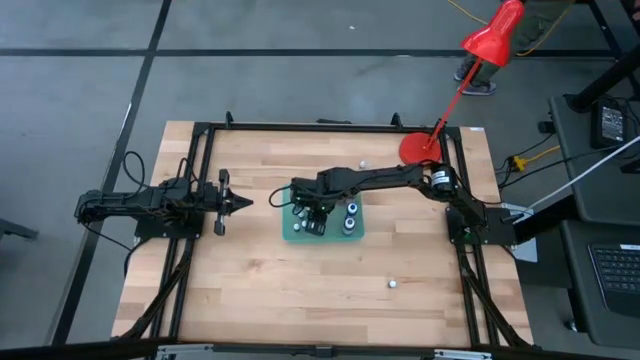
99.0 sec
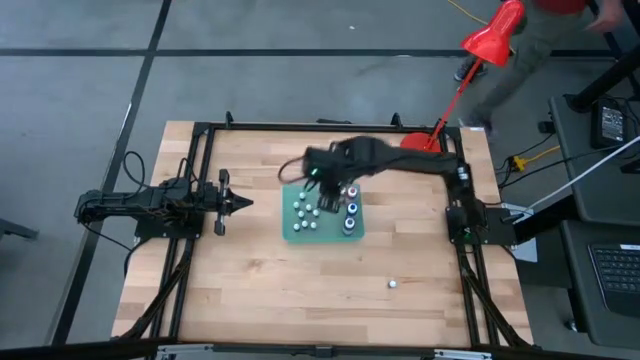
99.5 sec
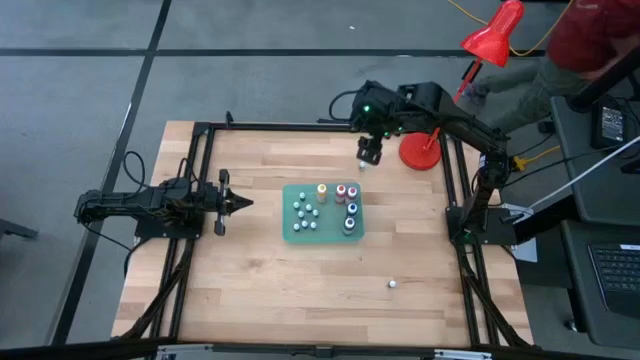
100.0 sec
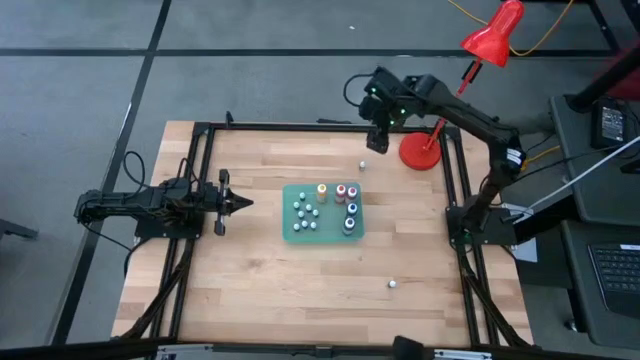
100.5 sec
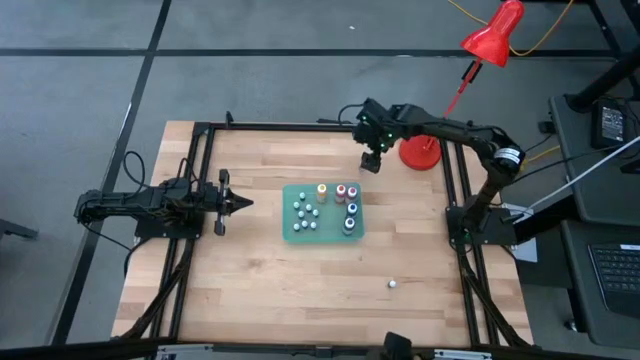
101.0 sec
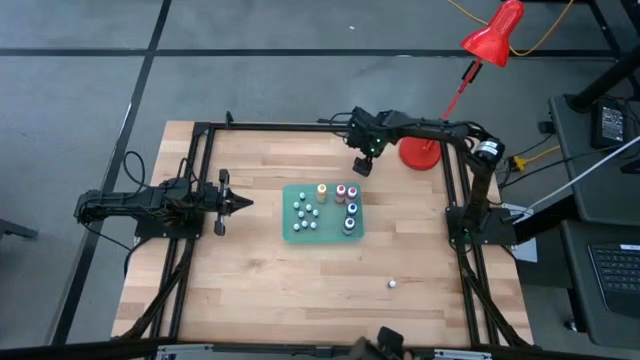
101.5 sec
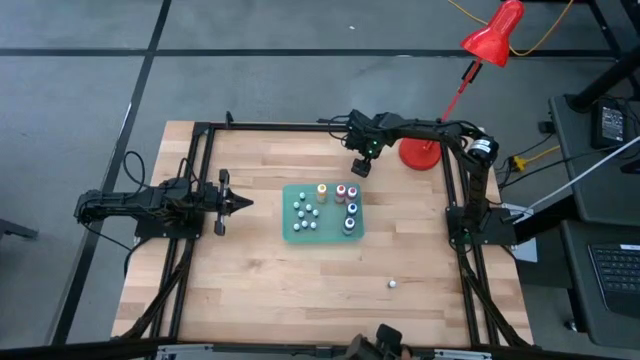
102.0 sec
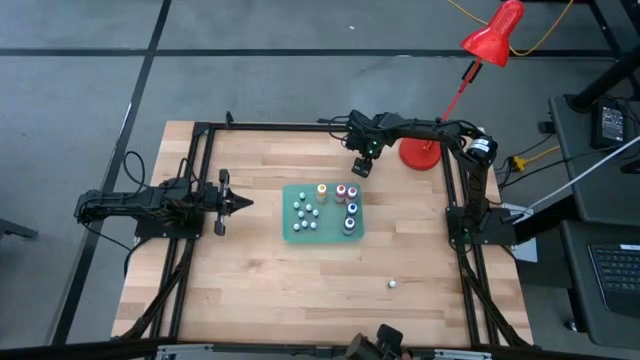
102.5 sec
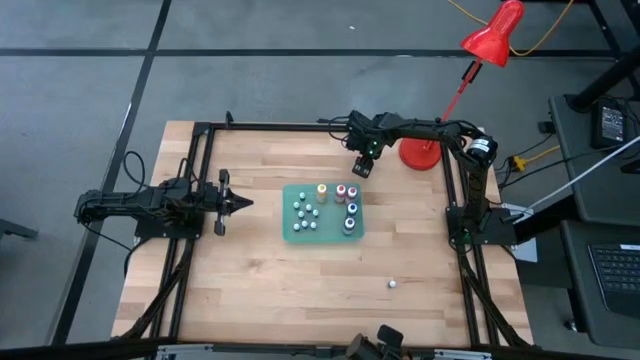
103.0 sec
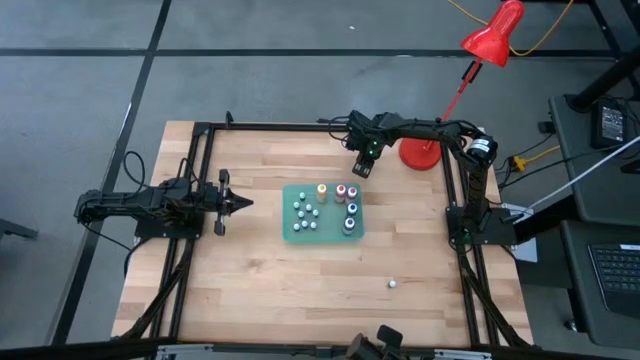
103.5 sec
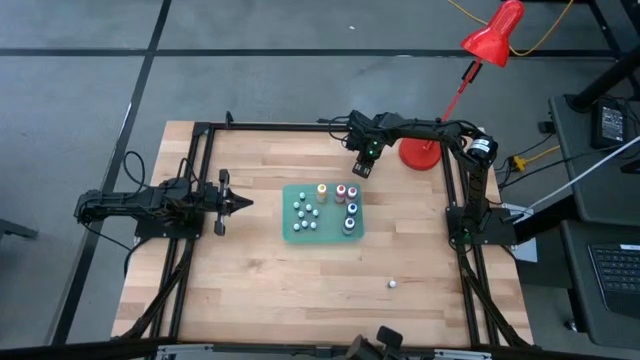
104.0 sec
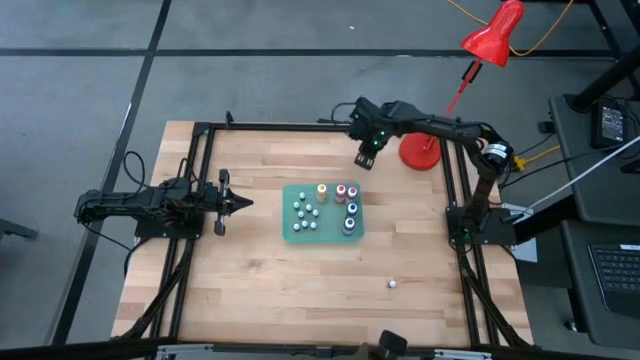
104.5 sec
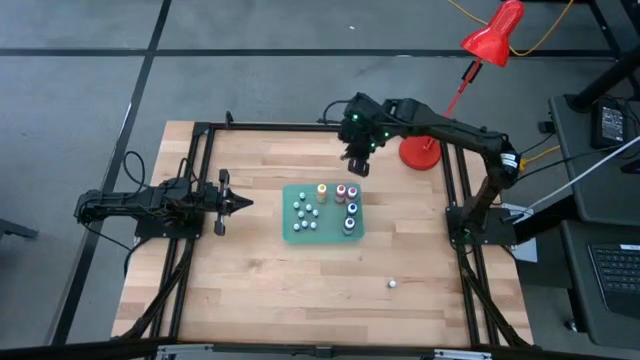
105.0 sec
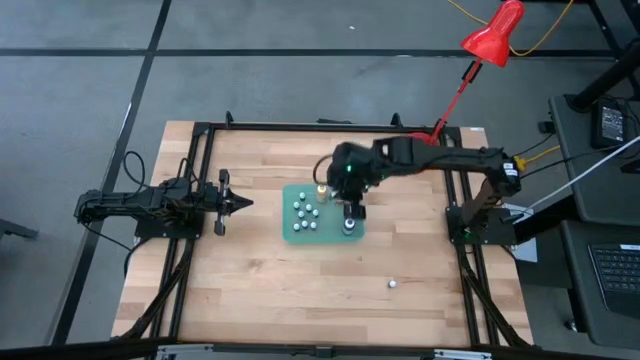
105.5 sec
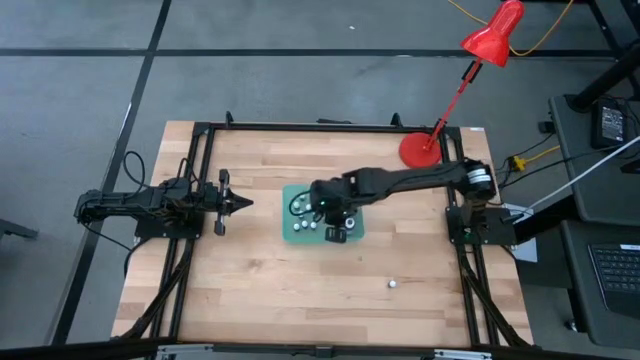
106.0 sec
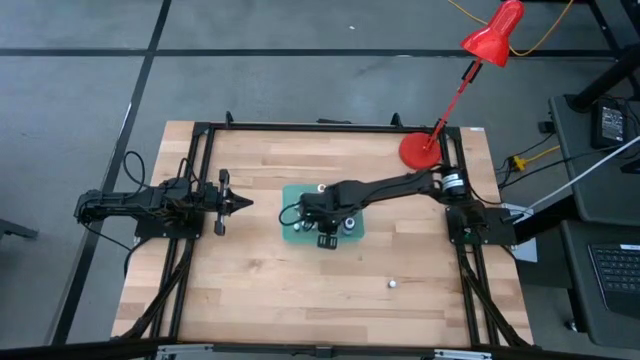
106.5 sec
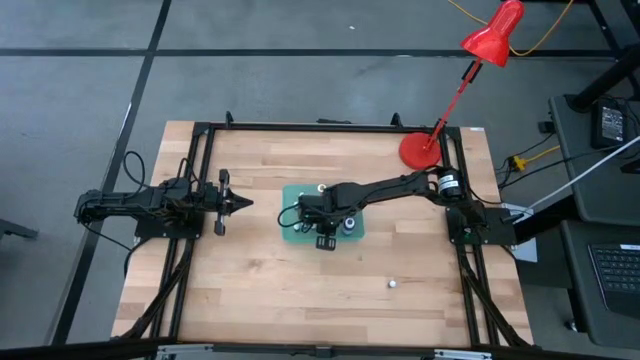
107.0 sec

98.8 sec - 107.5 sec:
Task: Pick & Place food coloring
Put the small green food coloring bottle into the green bin

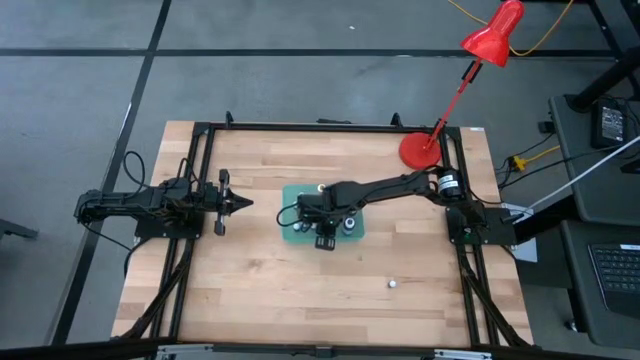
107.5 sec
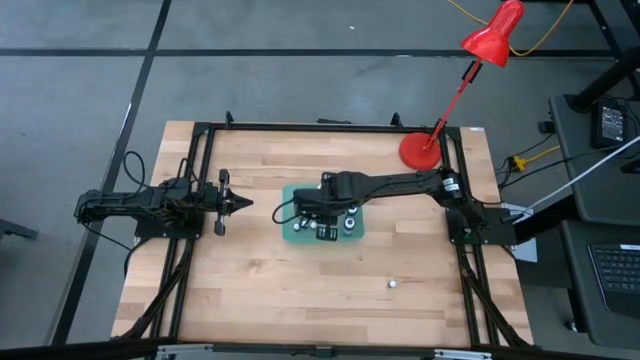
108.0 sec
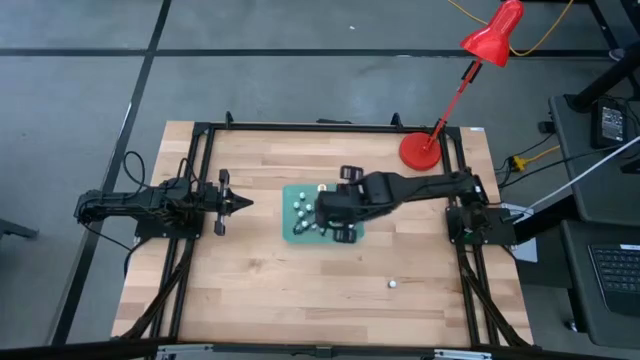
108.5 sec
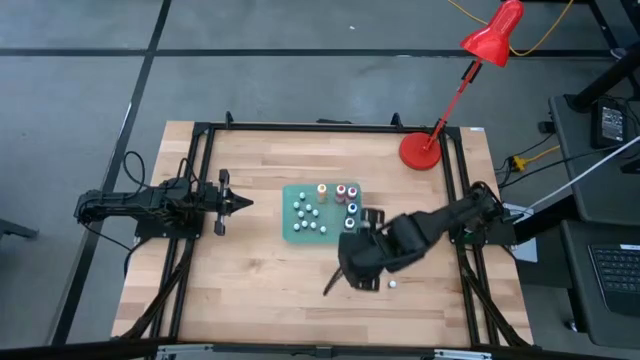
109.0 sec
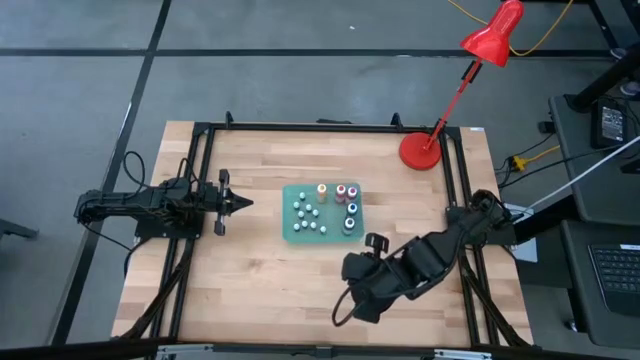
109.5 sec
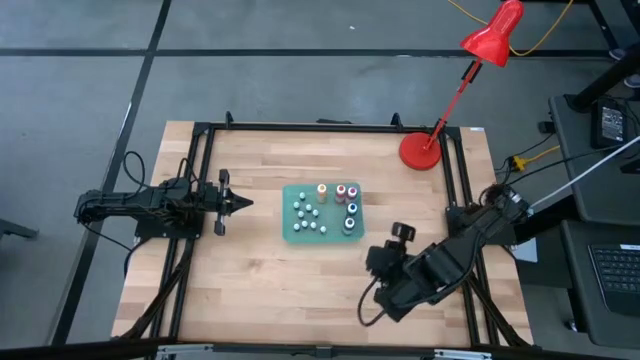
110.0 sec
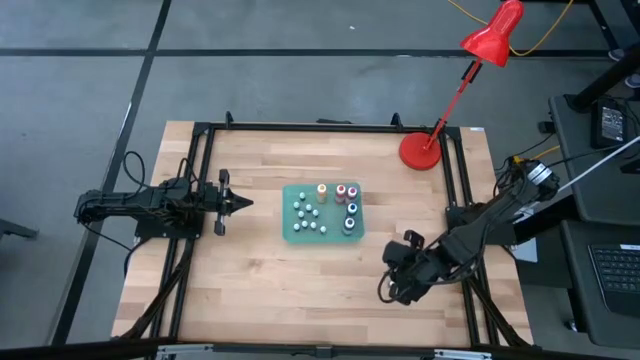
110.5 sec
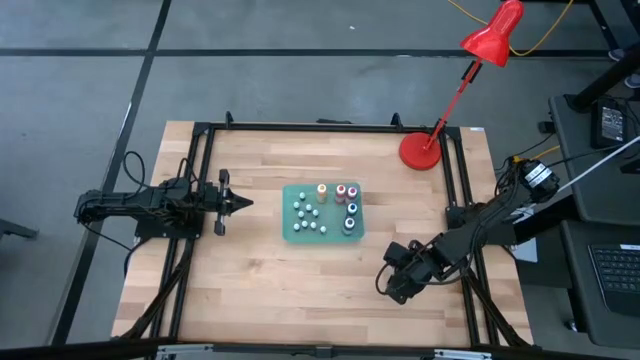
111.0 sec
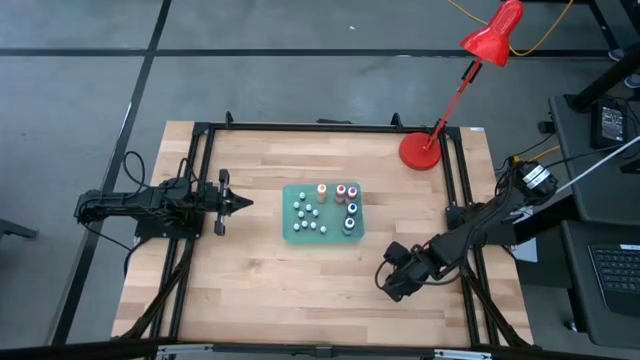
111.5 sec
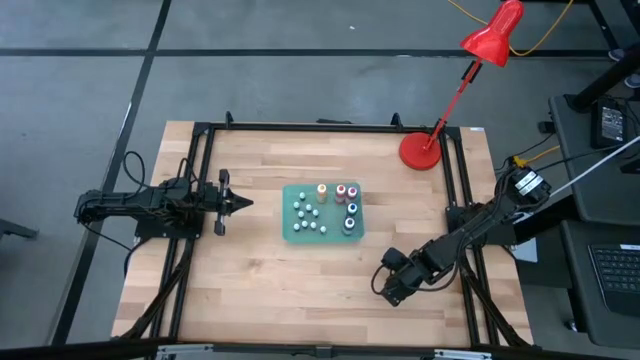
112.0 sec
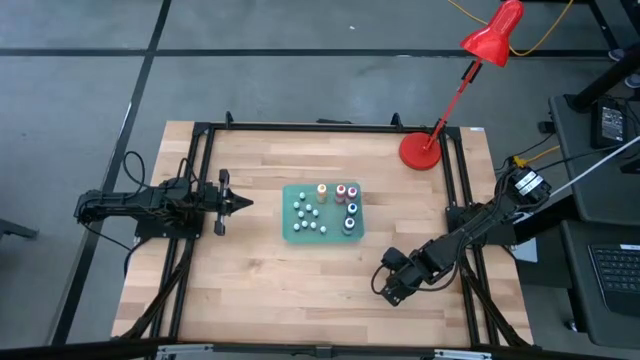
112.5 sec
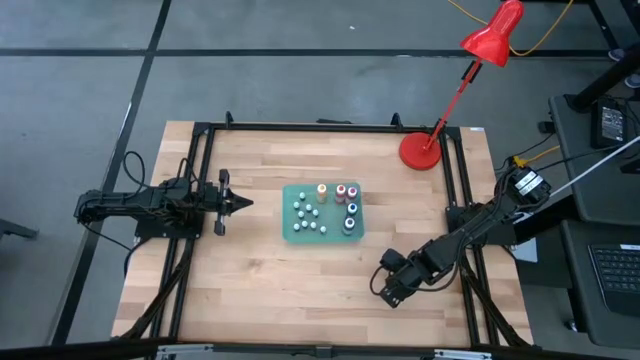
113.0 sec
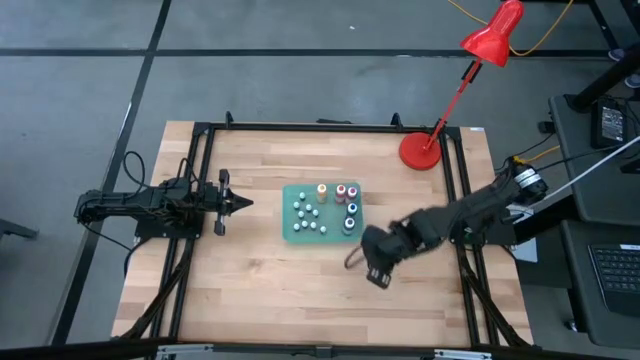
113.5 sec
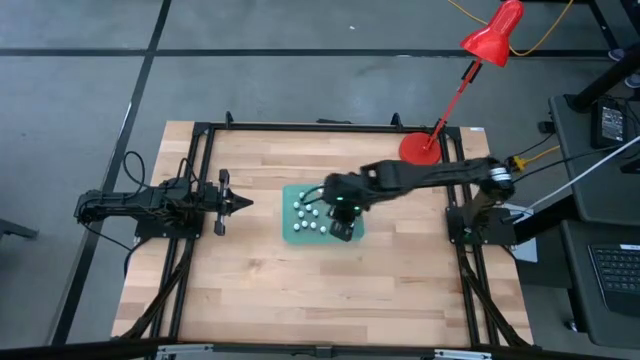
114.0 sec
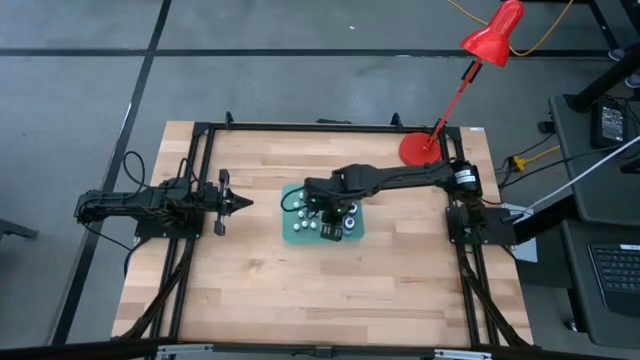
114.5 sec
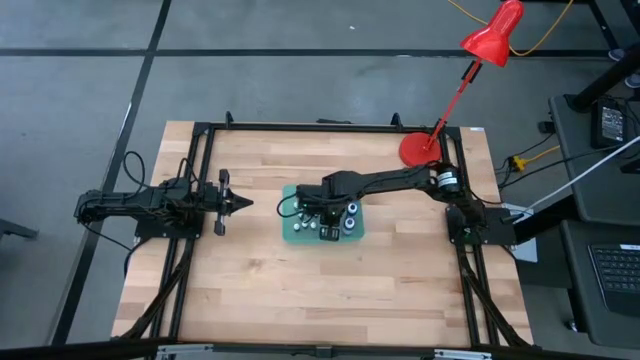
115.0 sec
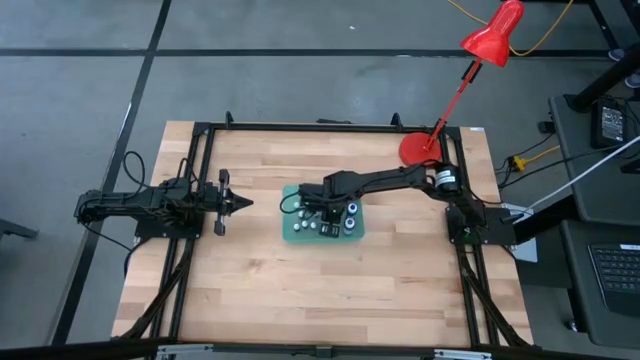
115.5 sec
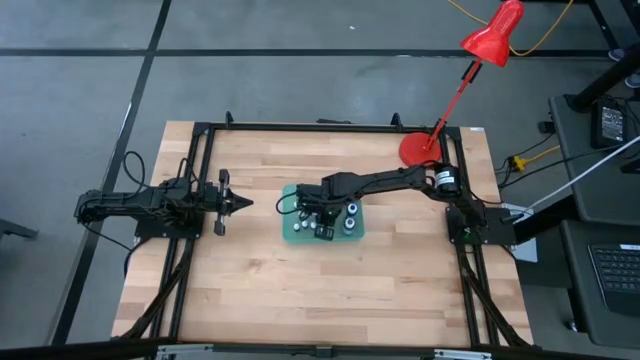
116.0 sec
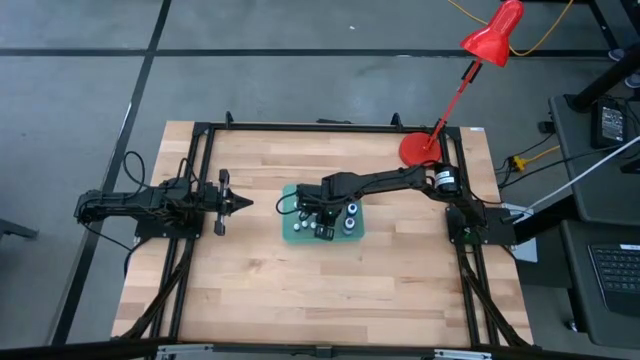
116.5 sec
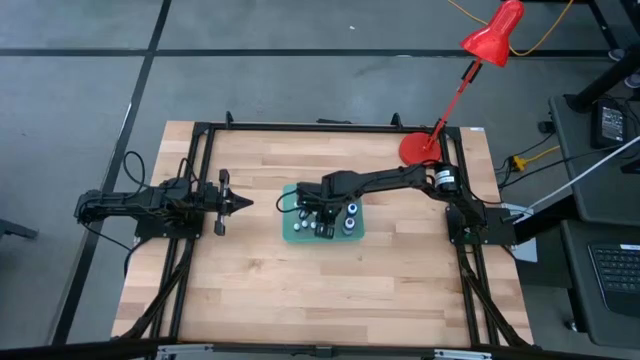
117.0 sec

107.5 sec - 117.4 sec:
Put the small purple food coloring bottle into the green bin

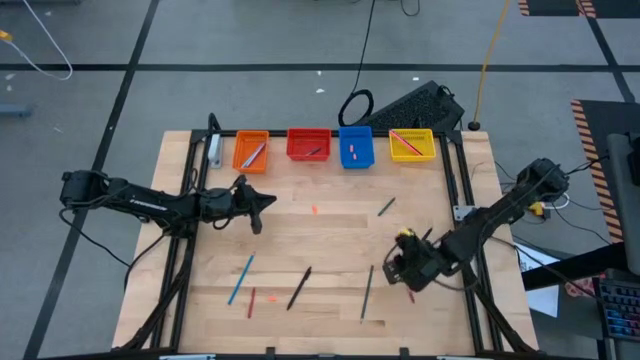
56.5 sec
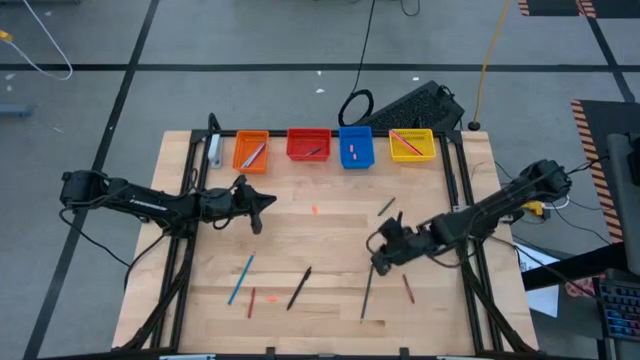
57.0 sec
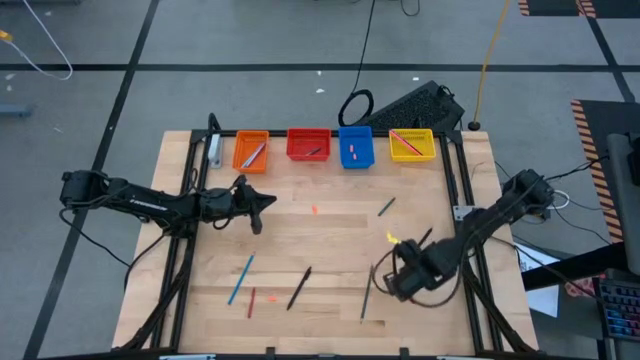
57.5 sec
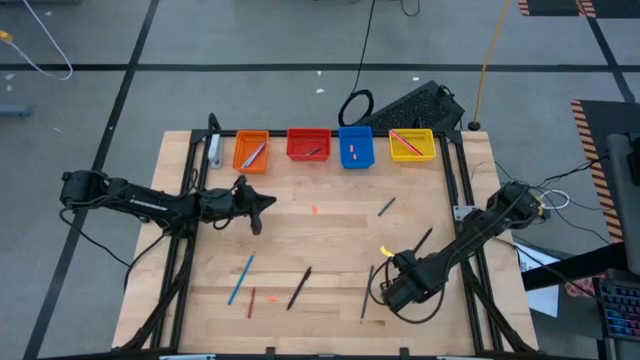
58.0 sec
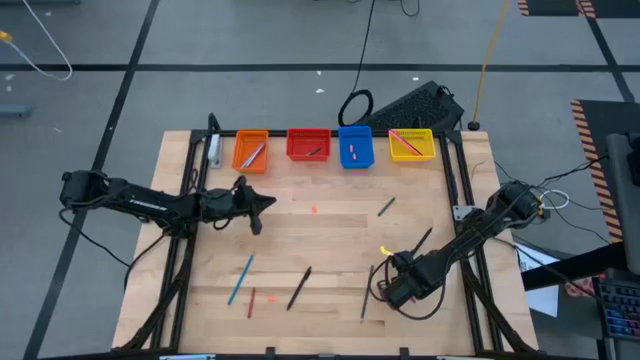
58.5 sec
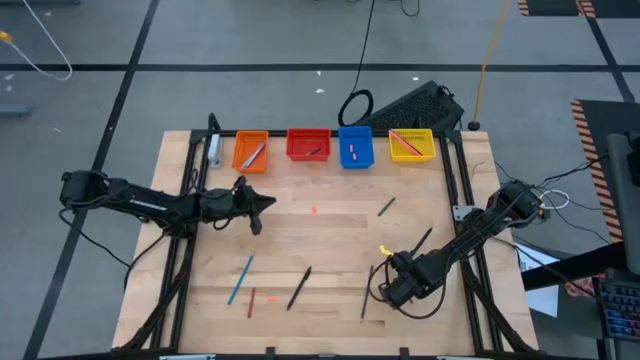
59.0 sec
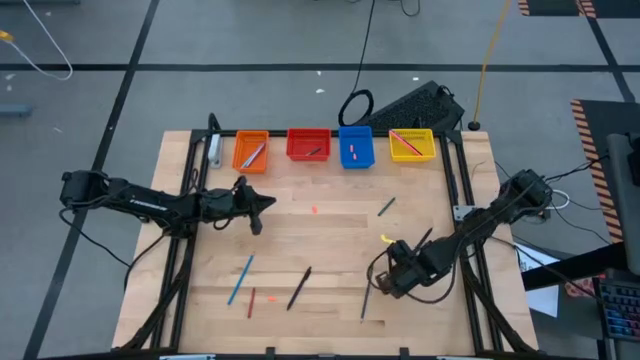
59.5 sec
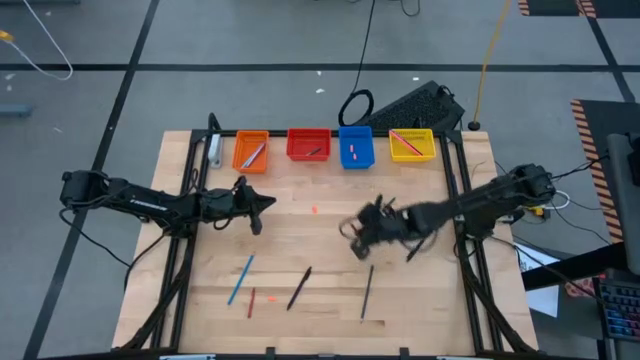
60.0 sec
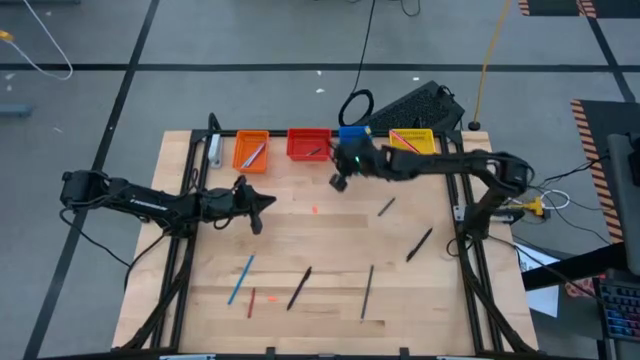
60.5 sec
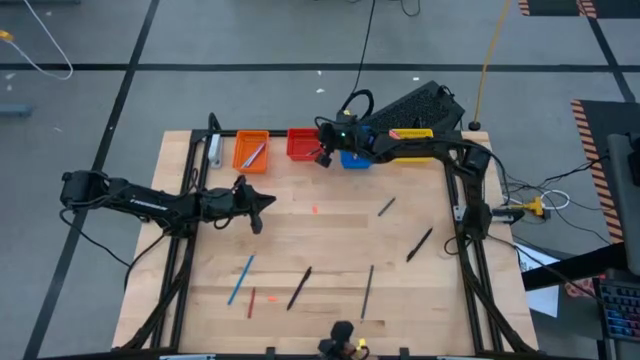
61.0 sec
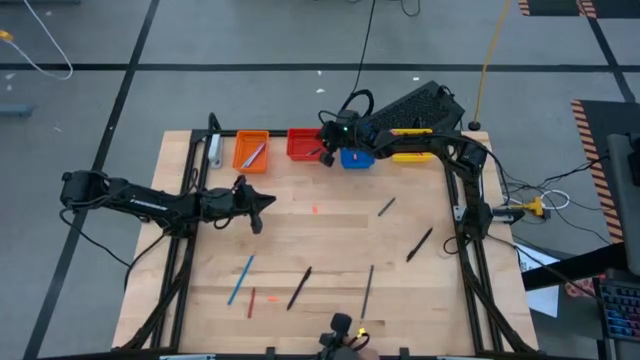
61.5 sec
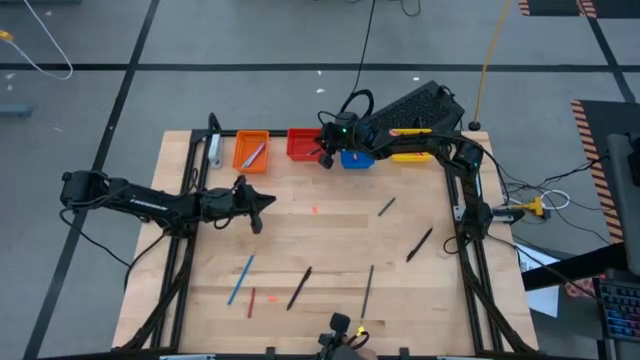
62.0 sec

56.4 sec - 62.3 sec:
Task: Sort crayons/erasers/pens/pencils in bins
Put the right red crayon into the red basket
